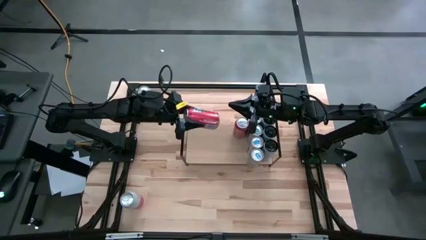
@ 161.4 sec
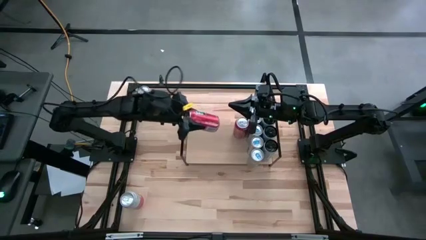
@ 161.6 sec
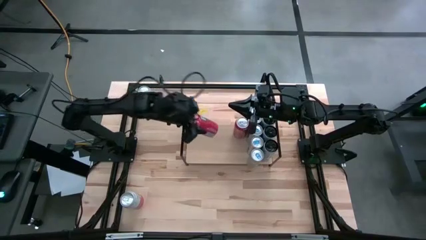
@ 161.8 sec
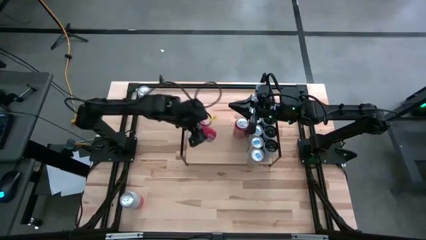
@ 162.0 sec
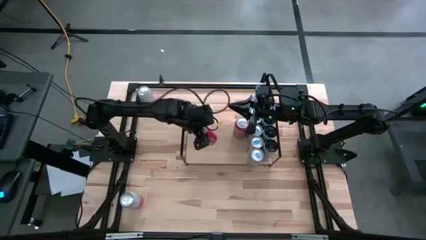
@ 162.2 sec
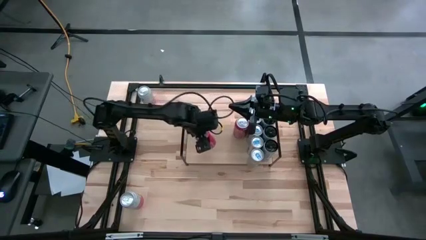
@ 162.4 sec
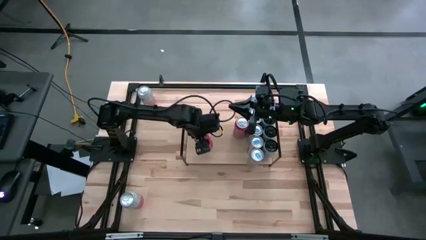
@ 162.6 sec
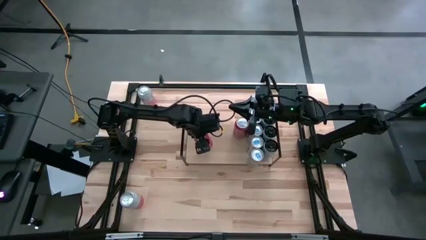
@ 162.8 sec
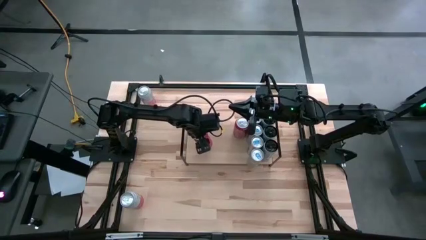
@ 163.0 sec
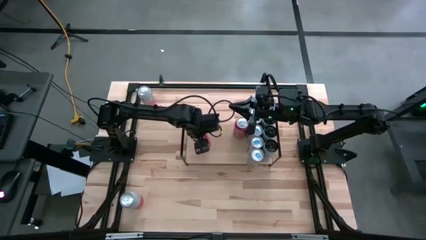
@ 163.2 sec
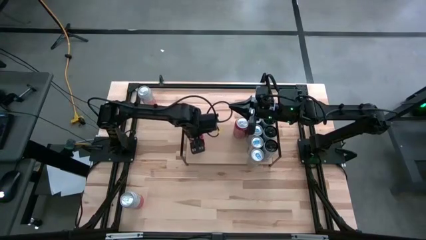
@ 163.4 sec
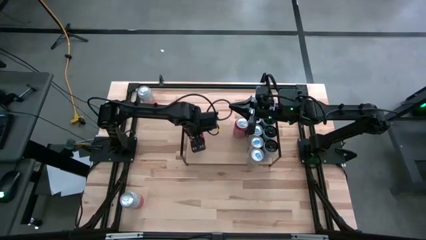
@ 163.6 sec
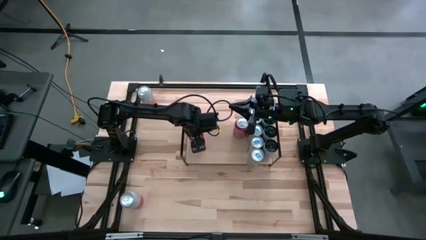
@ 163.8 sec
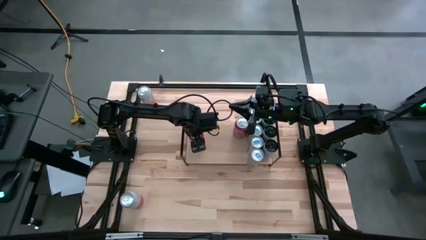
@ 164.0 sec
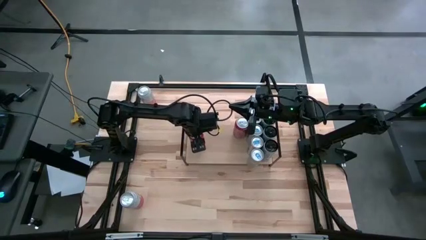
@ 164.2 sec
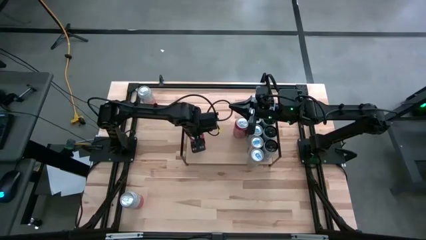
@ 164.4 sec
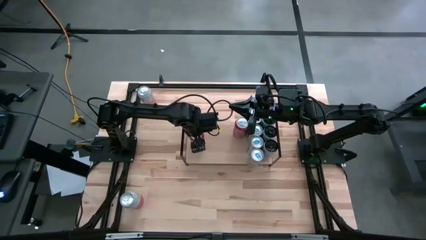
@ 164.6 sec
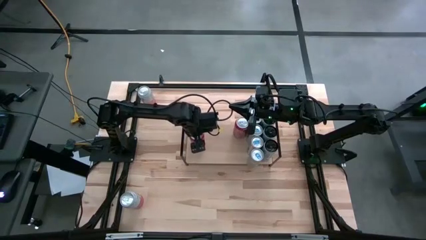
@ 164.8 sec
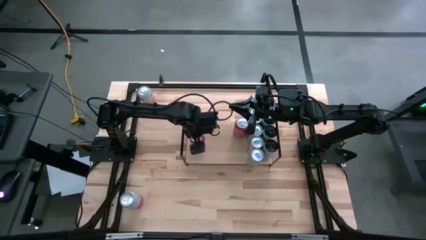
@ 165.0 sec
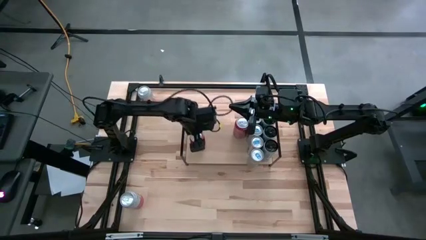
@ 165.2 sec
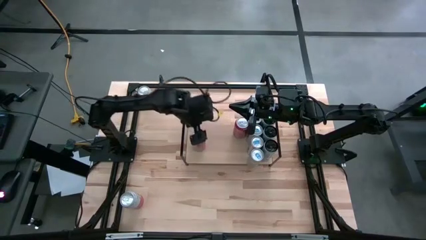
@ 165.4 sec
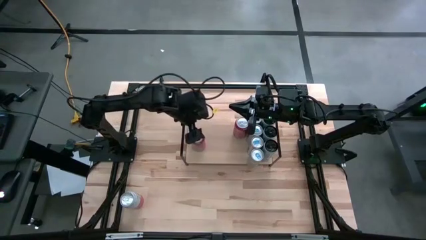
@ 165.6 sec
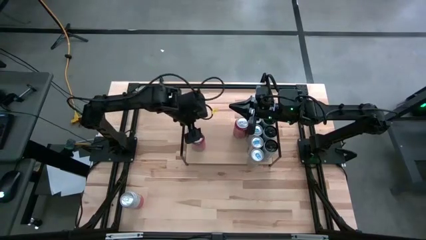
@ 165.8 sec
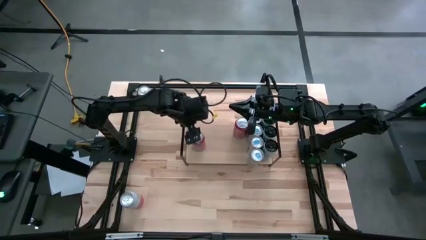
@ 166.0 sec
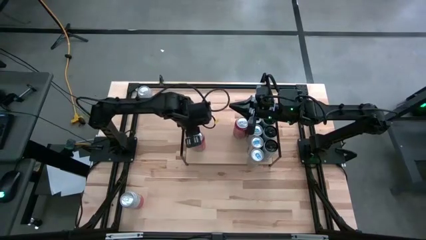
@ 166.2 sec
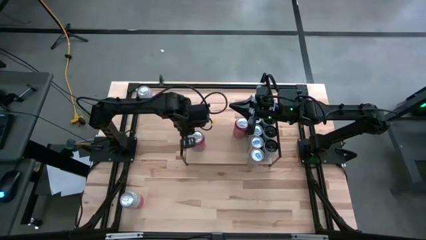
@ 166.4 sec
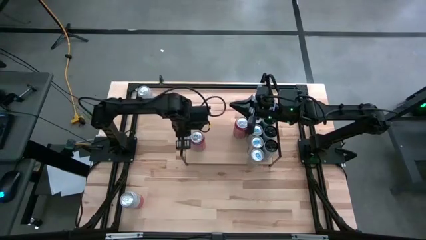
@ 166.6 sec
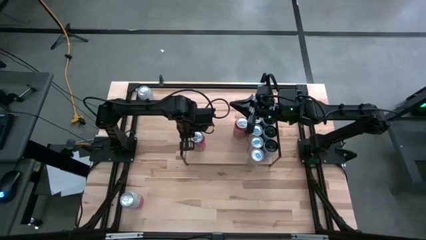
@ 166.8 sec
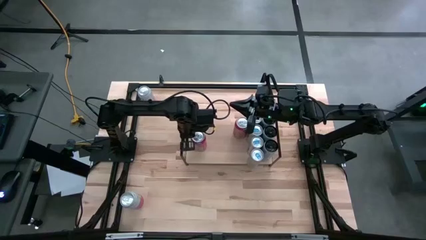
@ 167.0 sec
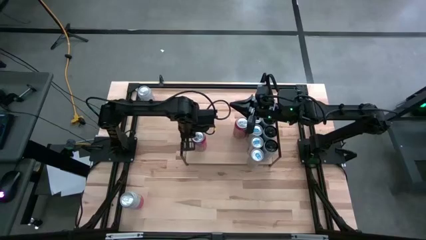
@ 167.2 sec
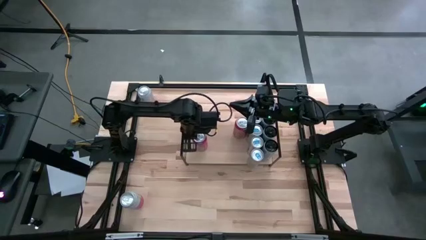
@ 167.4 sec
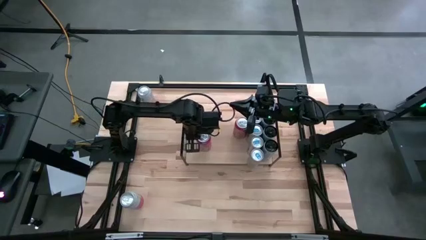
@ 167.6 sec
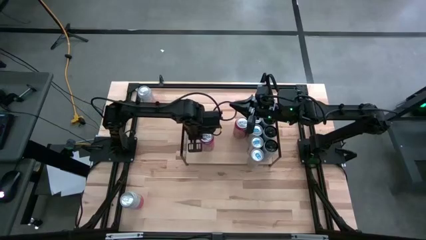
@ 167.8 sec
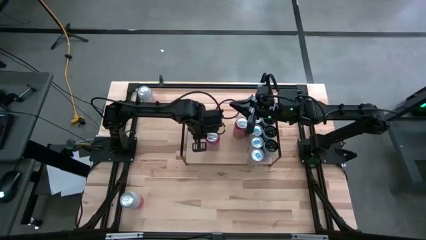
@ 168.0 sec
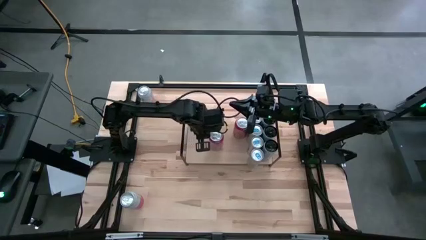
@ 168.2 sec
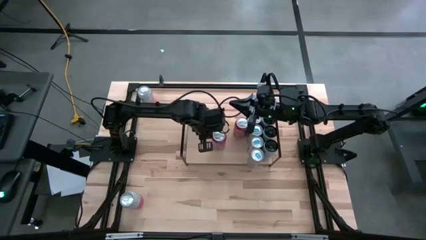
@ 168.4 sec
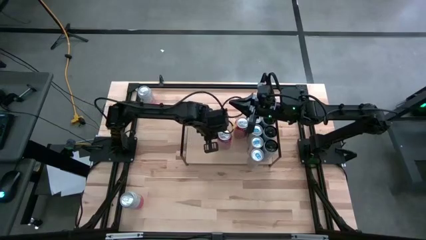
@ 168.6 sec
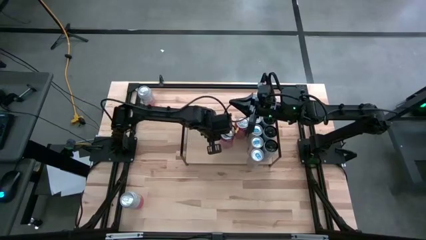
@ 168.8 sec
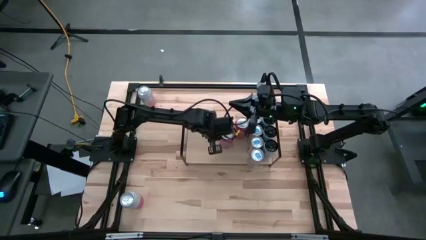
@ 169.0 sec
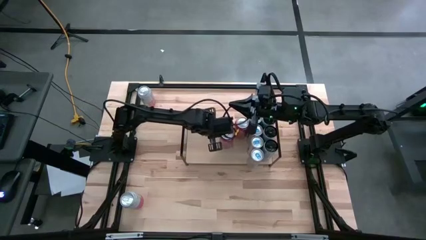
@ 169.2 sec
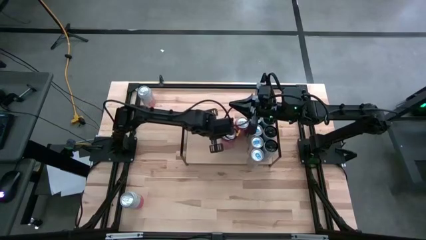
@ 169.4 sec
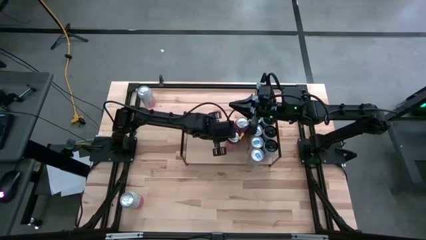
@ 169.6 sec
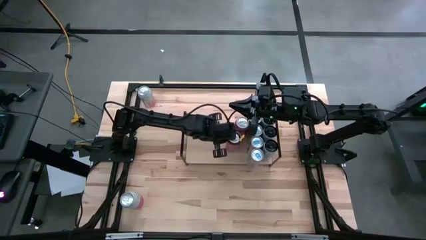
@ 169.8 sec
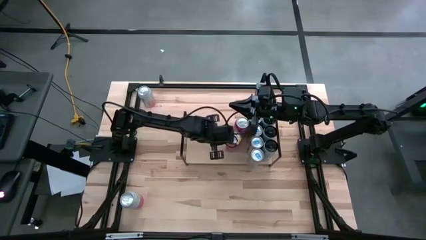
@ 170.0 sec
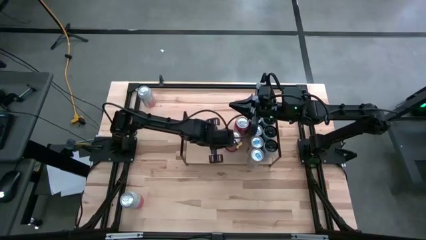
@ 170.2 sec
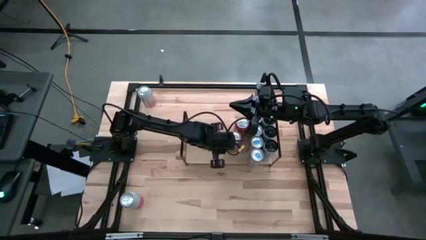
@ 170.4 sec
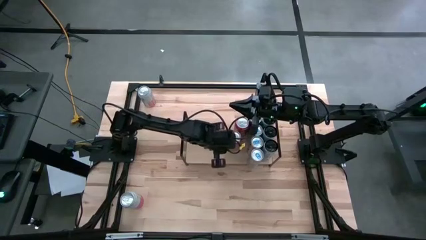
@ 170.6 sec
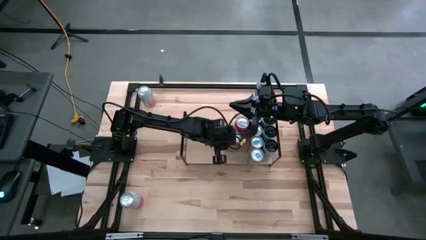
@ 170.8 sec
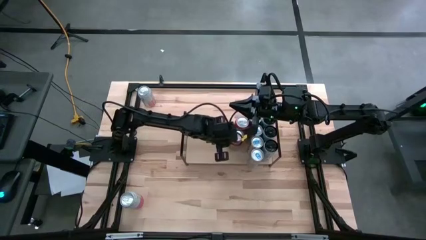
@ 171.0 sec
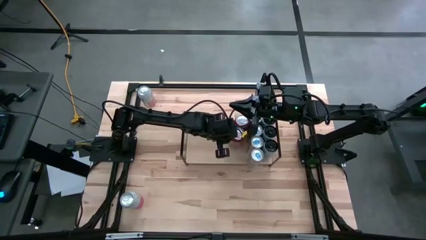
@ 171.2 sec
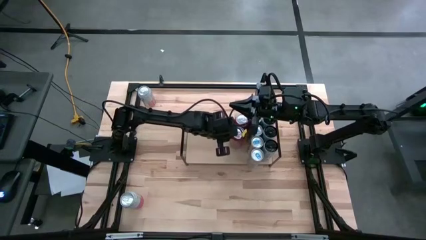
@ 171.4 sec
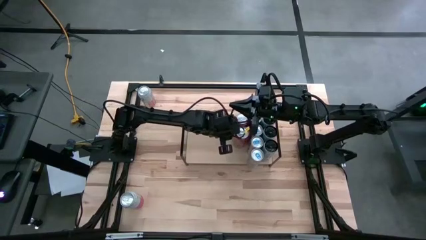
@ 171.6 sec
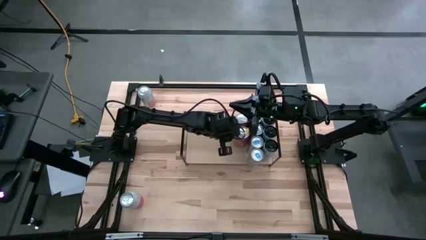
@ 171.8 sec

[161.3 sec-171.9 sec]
Task: Place canned beverage on shelf
Put the red soda can on the shelf aligned with the other red soda can

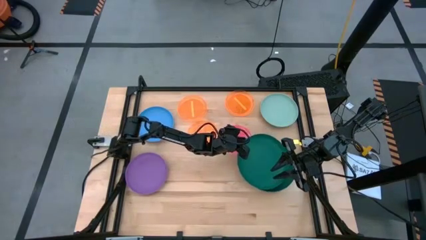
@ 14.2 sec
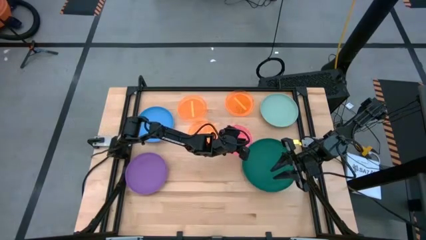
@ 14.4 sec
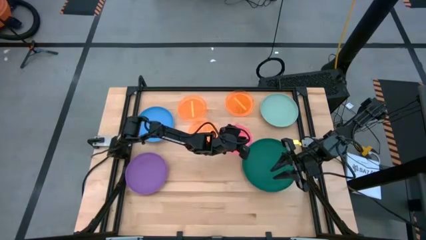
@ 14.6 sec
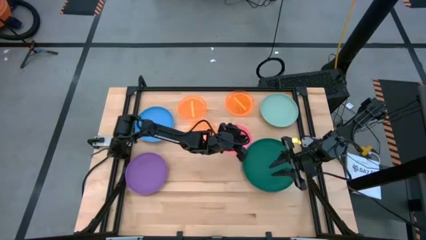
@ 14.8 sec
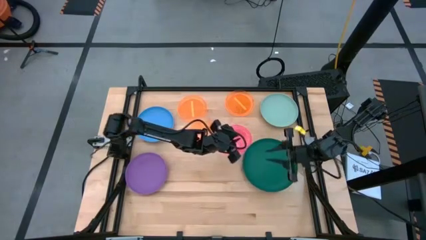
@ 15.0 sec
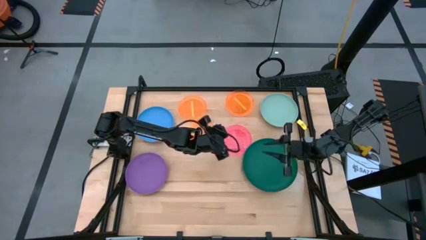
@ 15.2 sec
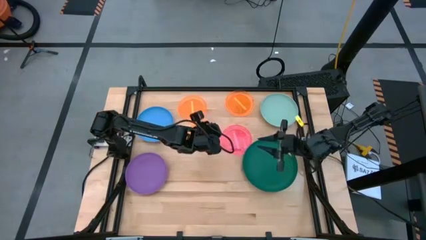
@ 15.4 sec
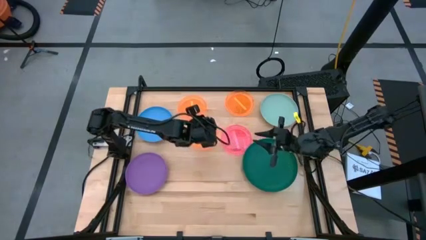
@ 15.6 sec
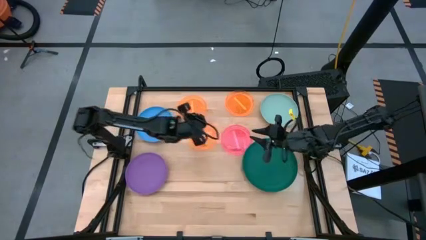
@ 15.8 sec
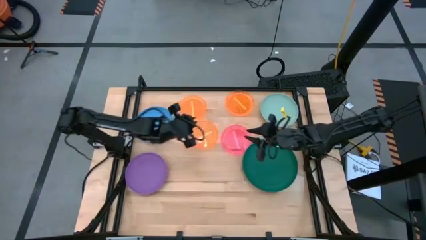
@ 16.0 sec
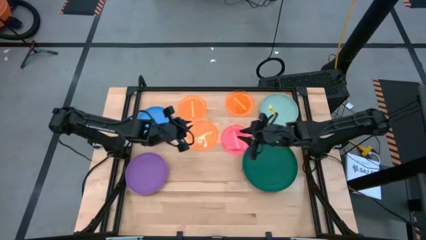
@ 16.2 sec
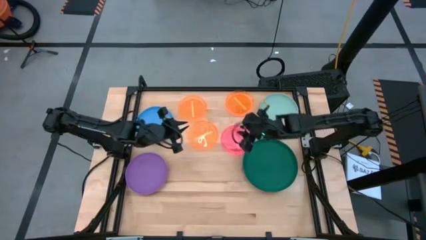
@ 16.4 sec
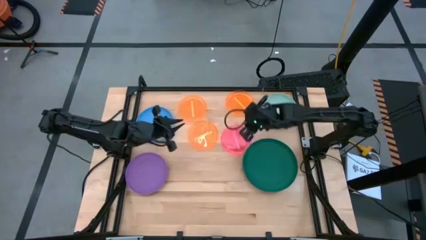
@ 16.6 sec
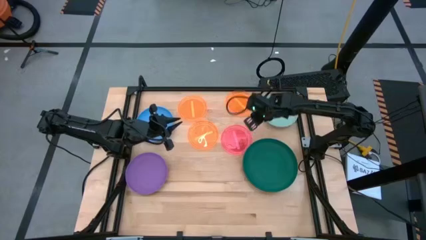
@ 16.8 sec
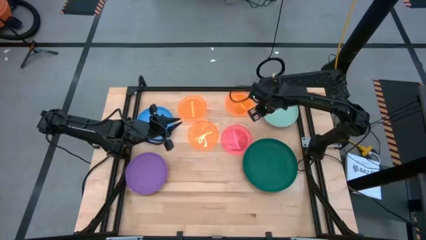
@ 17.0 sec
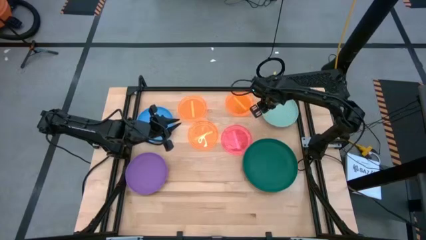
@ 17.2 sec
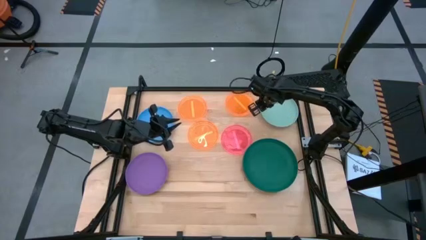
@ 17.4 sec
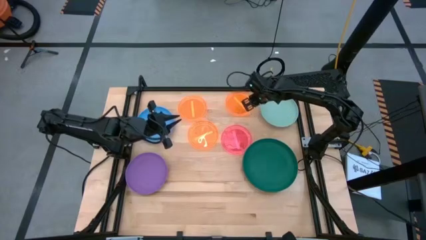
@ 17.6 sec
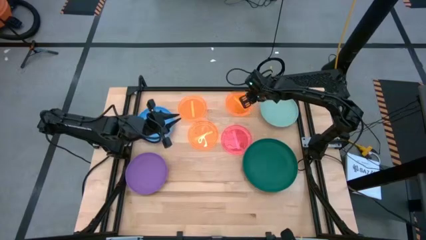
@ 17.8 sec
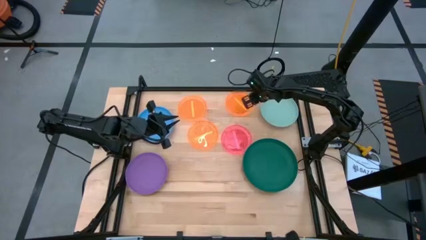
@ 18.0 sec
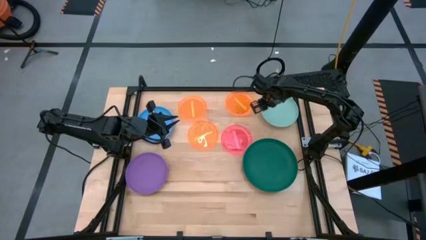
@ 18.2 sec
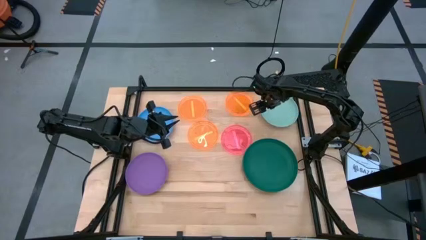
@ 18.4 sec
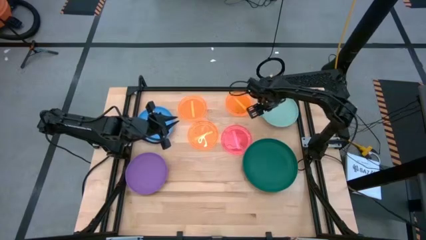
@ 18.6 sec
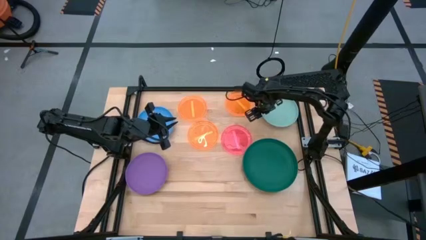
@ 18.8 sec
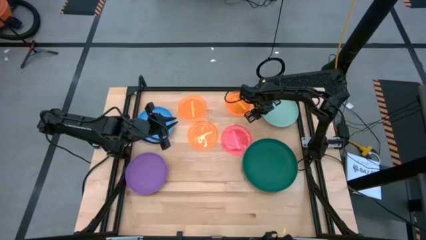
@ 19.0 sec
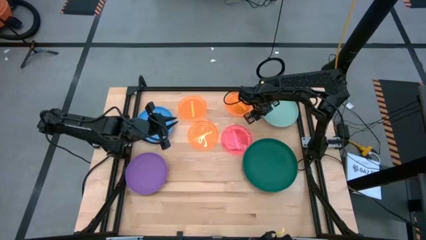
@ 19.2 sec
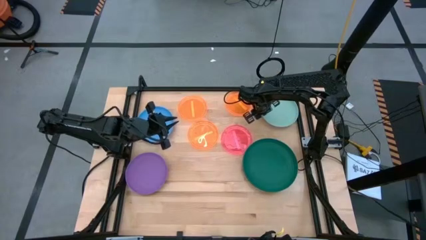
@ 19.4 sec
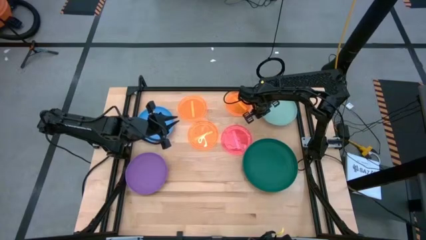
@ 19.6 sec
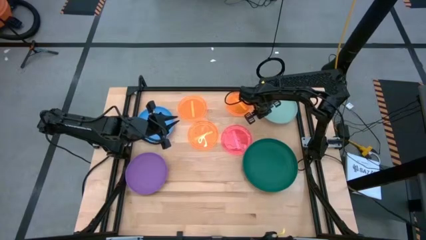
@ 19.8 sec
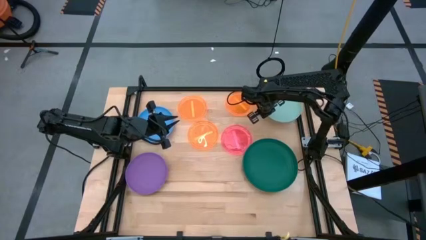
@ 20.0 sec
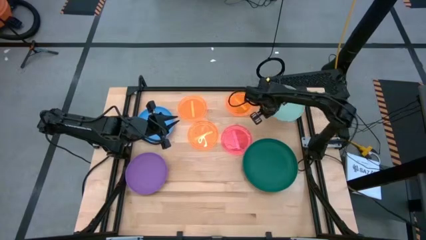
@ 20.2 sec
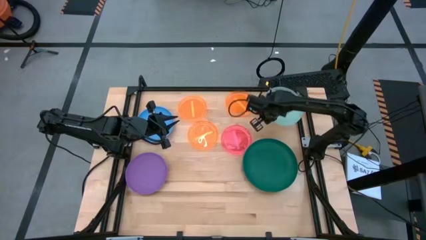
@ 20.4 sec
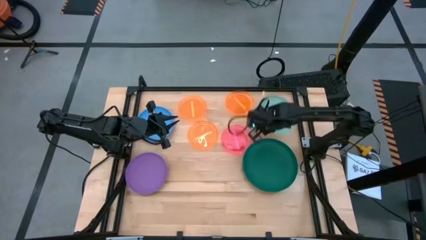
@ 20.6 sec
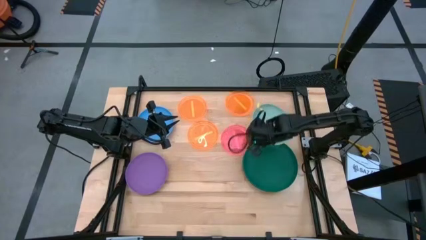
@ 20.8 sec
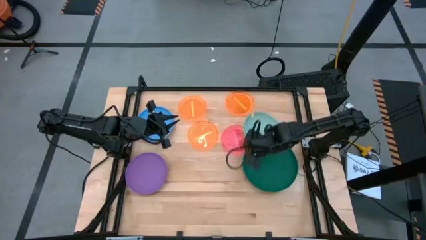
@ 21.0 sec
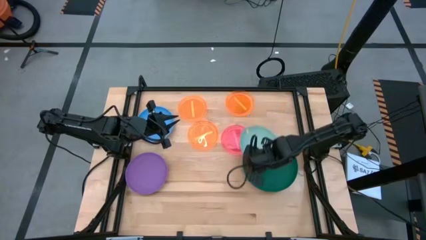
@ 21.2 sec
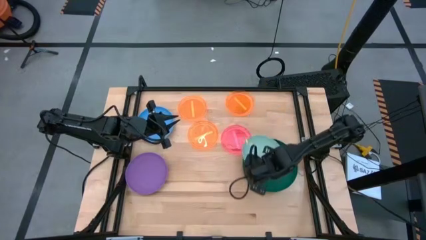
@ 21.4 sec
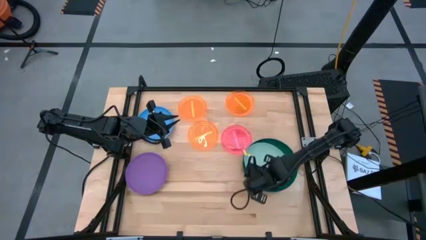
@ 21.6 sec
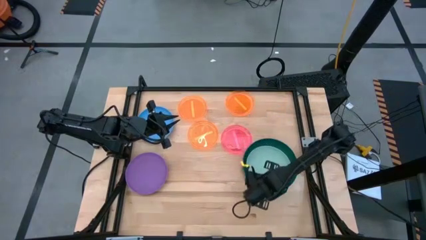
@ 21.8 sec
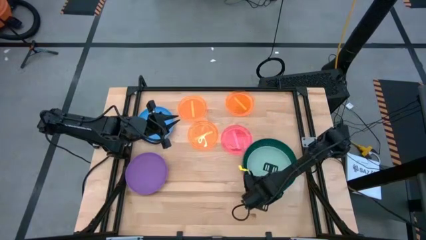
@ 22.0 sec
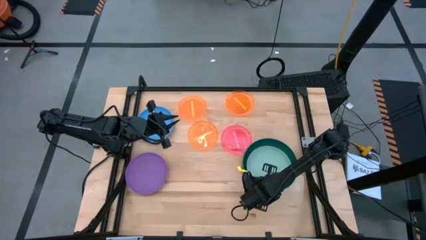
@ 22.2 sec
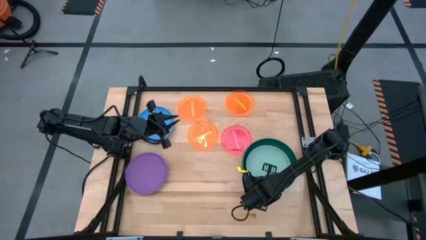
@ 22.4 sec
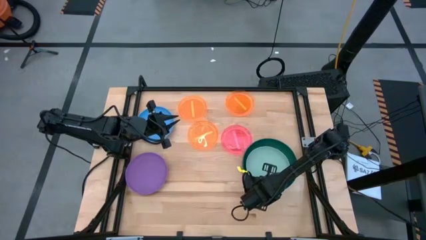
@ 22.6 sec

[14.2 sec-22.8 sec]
Task: Stack plastic plates
Stack the medium light green plate on top of the big green plate
